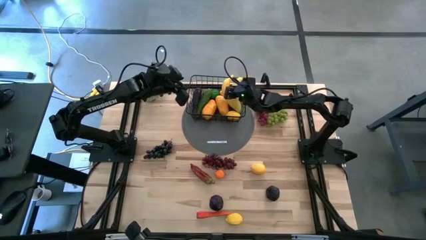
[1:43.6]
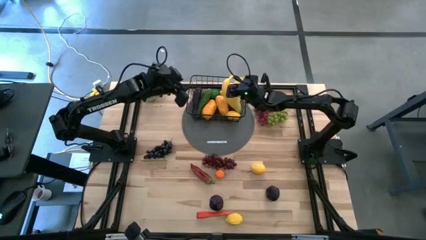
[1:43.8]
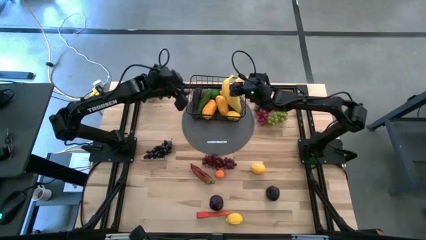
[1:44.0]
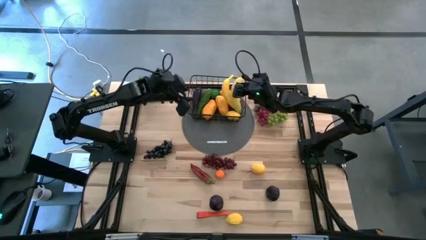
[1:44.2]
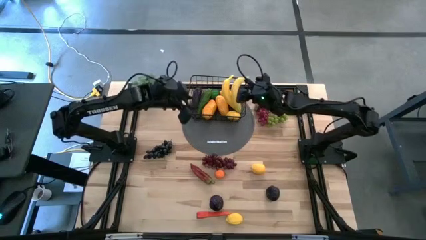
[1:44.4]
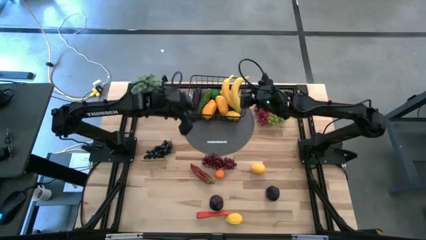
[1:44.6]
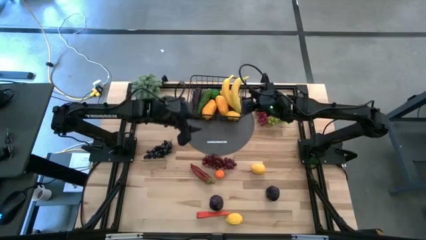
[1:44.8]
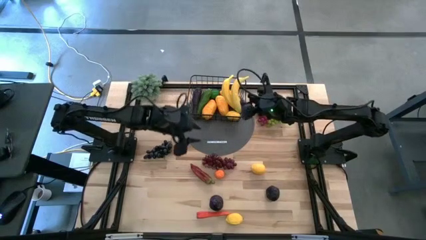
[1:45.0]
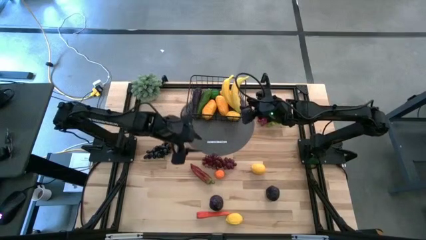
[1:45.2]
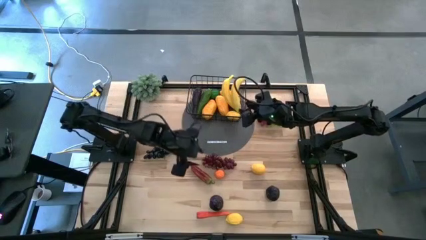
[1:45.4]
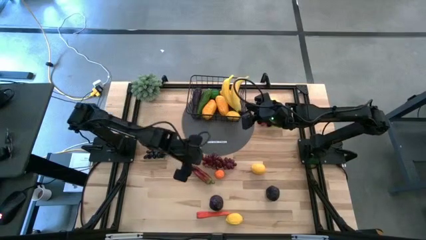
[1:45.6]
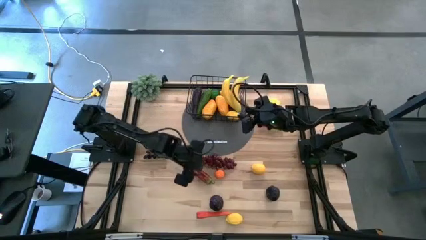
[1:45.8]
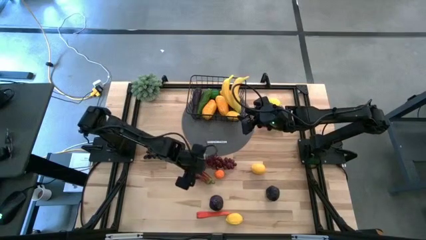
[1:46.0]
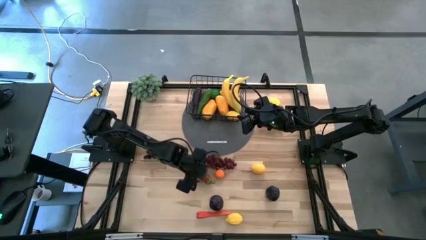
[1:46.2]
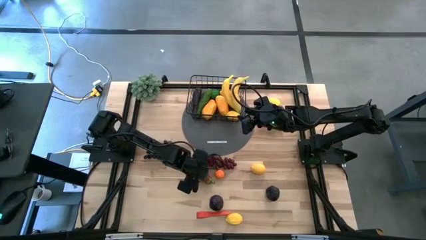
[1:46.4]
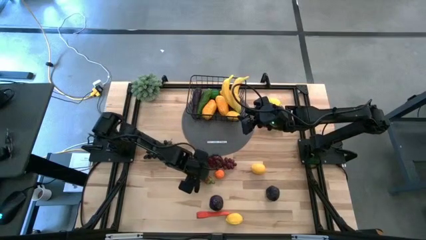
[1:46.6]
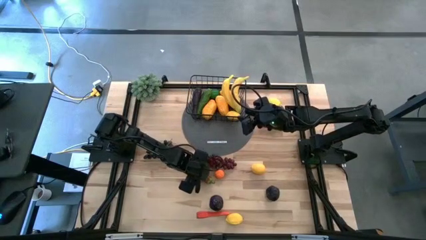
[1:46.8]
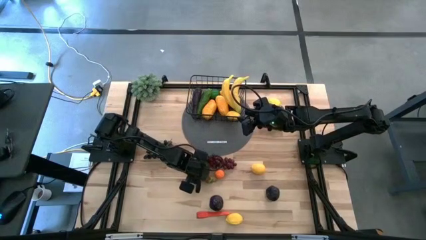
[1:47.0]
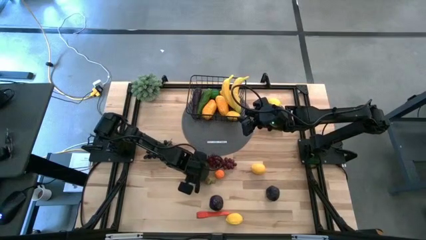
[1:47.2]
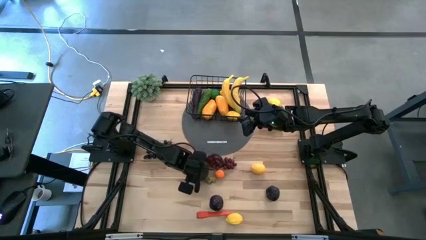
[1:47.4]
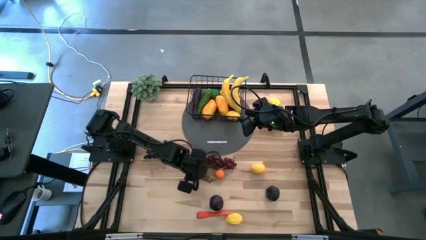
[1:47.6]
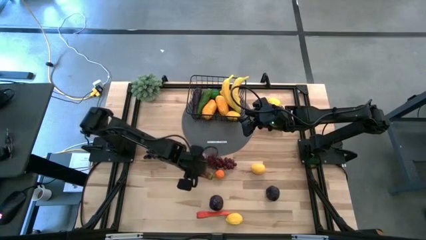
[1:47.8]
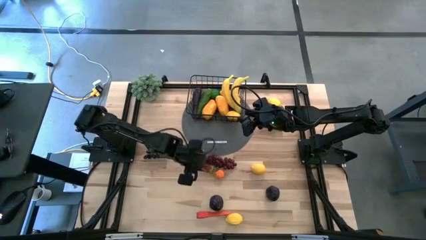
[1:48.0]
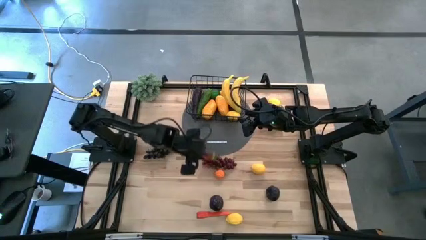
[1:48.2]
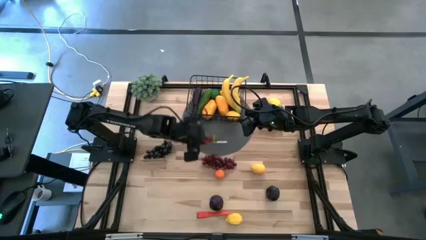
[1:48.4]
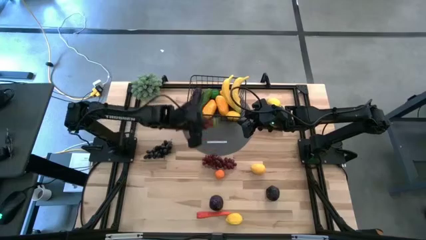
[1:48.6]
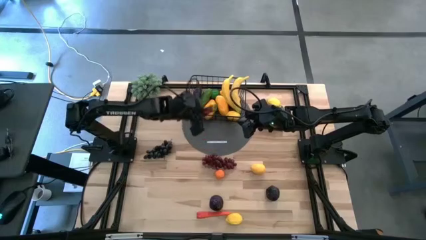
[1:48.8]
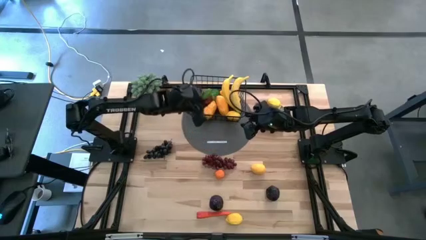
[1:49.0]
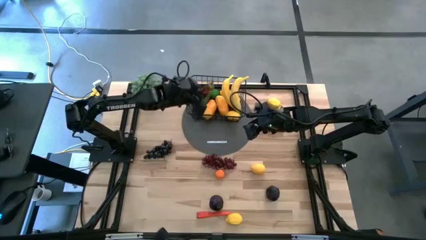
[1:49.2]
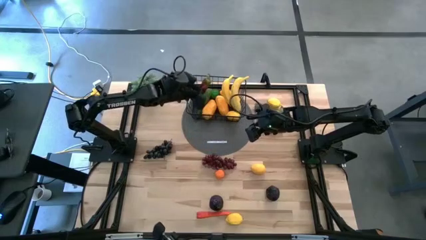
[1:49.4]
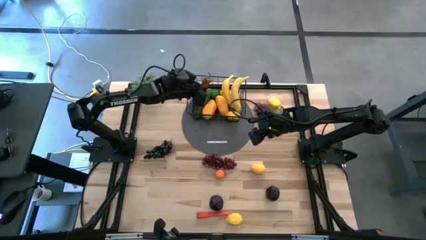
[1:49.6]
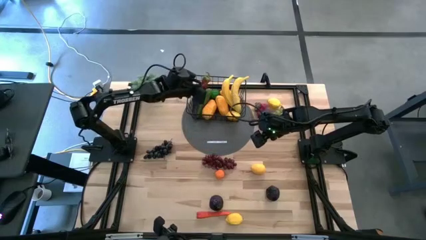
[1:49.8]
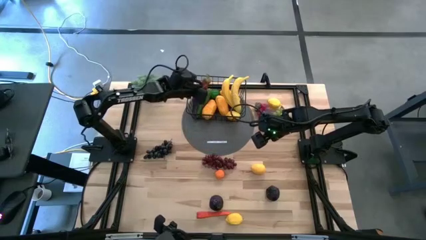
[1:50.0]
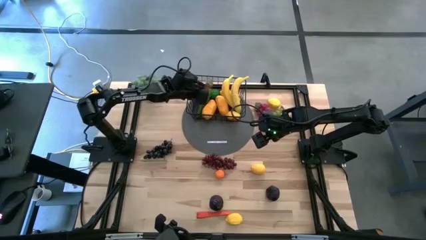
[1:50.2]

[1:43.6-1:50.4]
Task: Build produce basket
Put the red chili pepper into the black wire basket

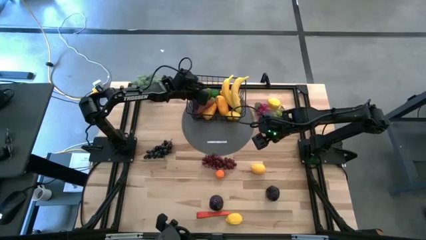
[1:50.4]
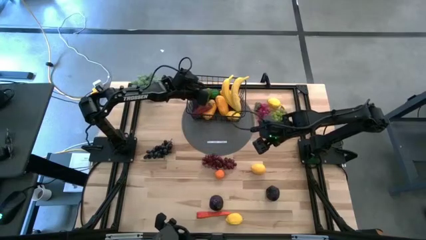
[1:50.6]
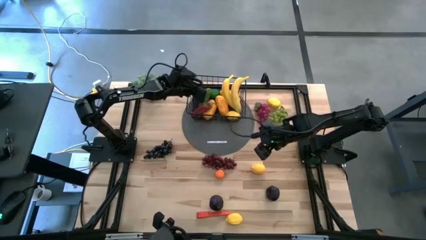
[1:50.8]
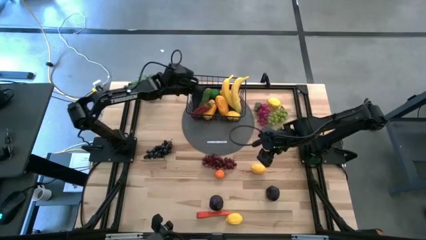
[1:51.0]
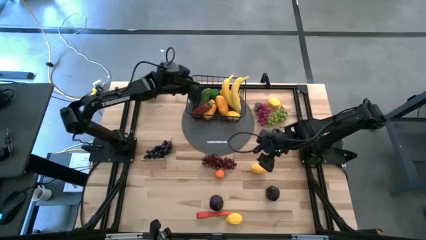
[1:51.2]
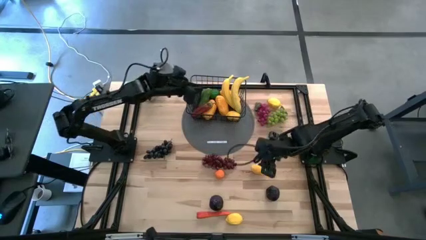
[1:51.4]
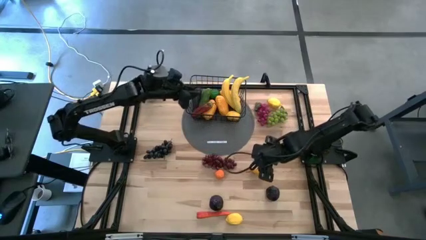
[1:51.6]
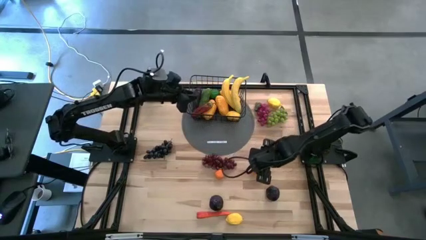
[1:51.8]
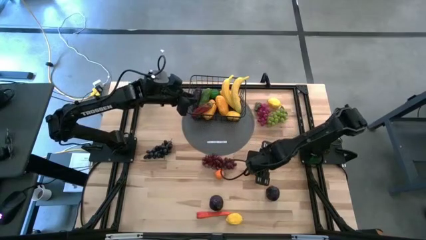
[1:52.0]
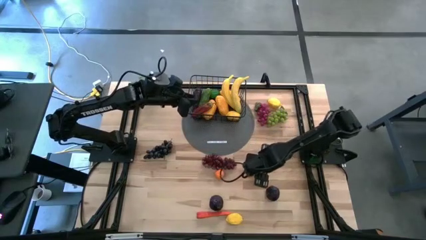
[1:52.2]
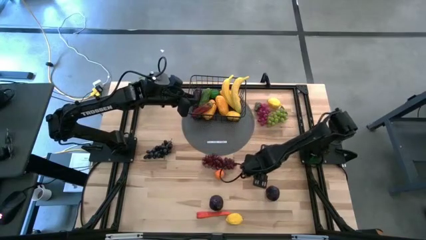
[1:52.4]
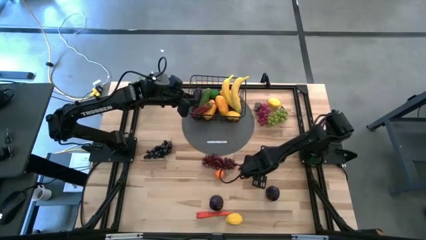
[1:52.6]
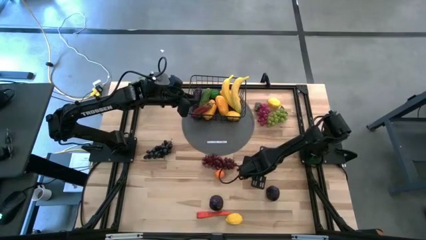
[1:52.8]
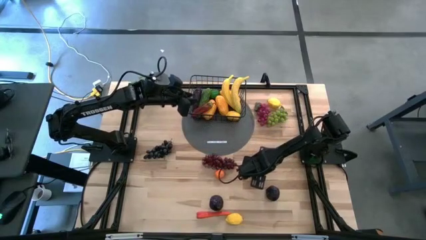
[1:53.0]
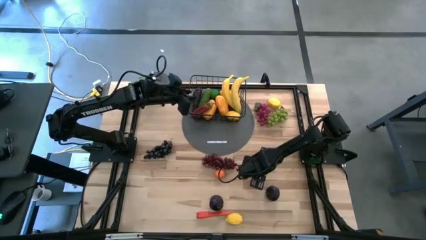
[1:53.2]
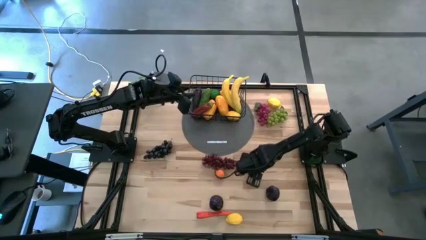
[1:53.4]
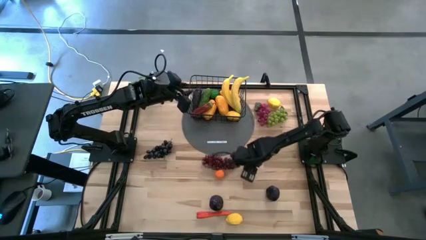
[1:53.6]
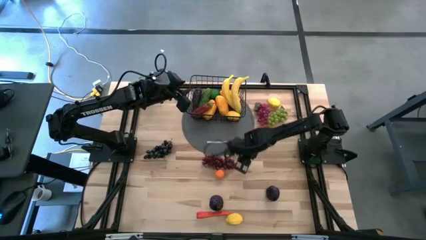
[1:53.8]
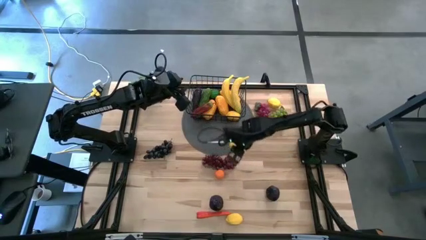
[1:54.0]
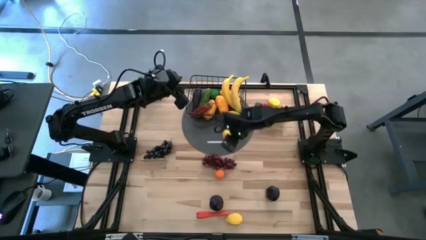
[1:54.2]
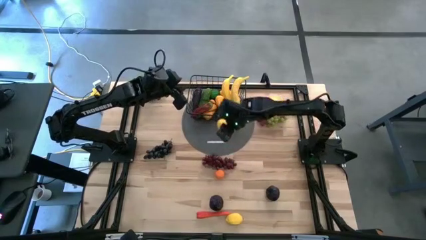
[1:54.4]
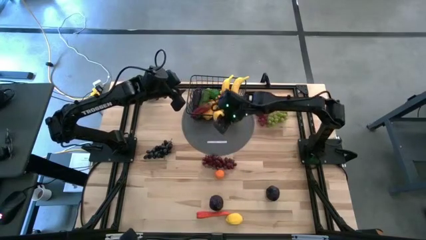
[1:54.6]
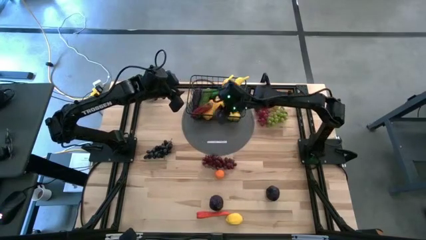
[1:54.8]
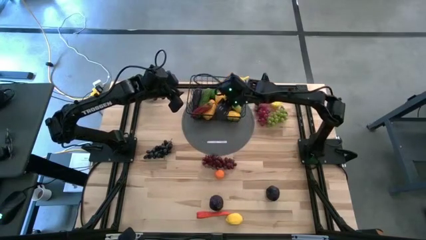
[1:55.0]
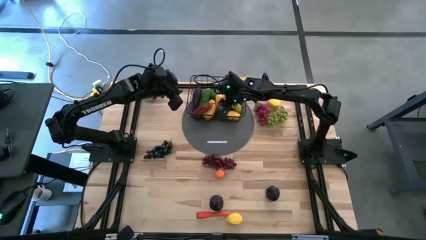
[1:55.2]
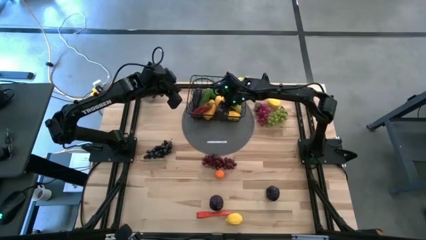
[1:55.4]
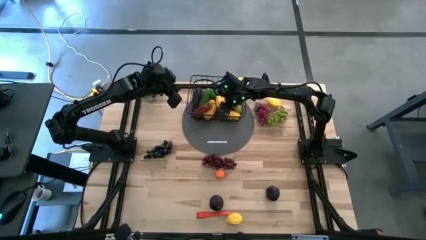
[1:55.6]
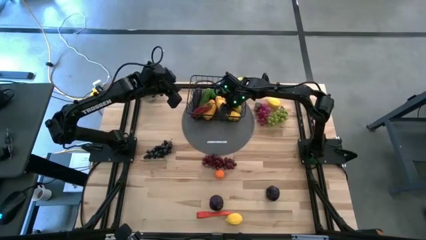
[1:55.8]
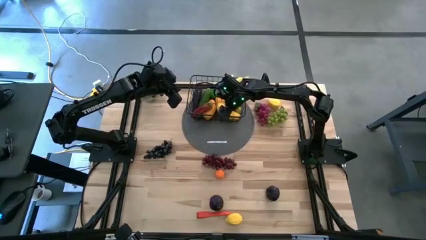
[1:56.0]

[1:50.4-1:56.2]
Put the middle yellow lemon into the black wire basket
